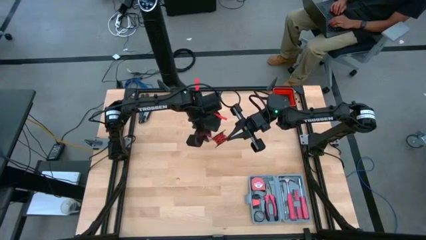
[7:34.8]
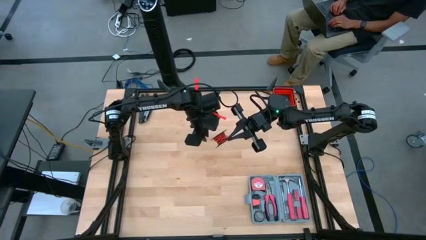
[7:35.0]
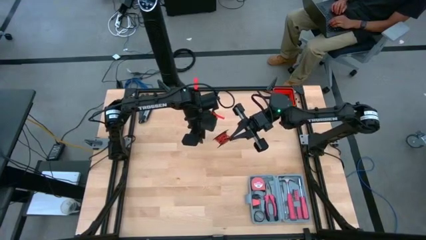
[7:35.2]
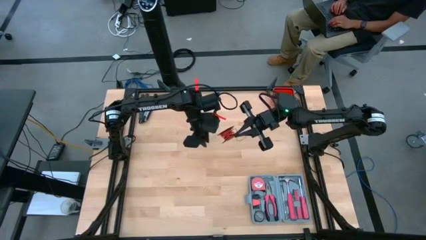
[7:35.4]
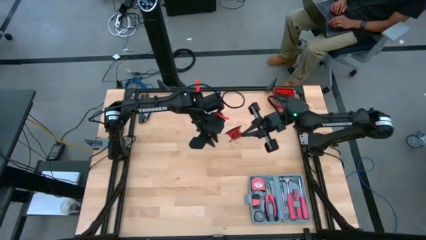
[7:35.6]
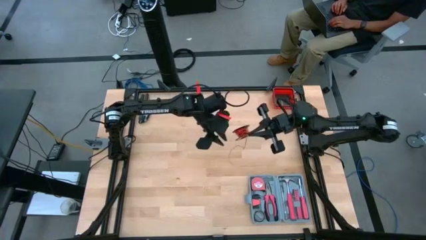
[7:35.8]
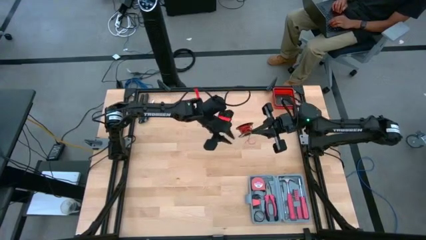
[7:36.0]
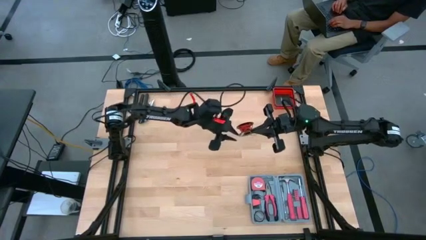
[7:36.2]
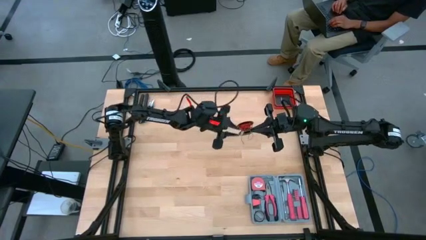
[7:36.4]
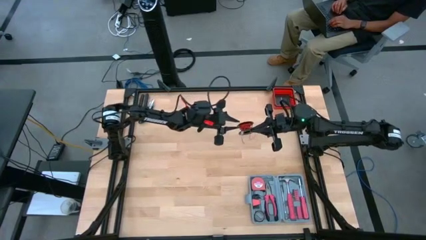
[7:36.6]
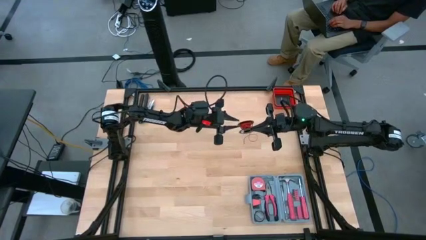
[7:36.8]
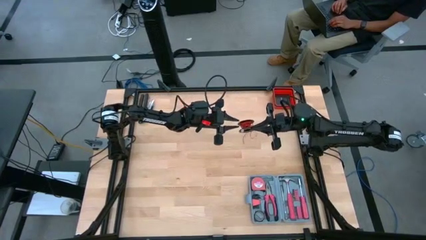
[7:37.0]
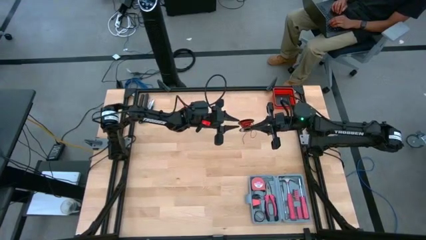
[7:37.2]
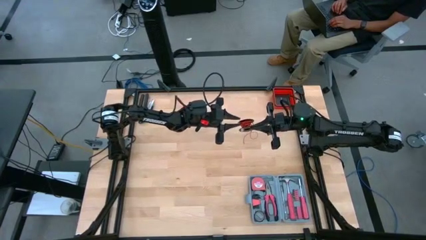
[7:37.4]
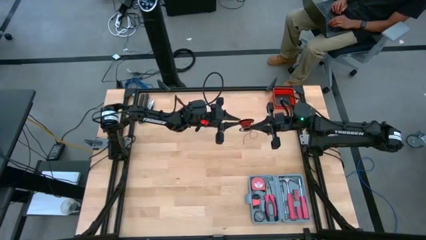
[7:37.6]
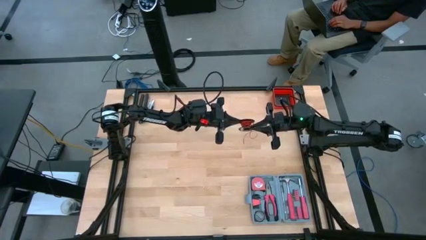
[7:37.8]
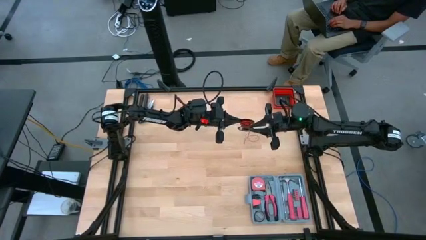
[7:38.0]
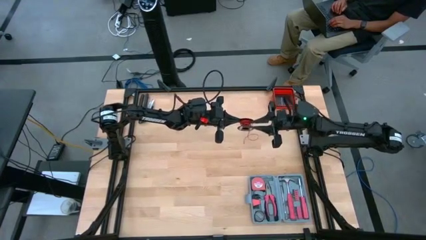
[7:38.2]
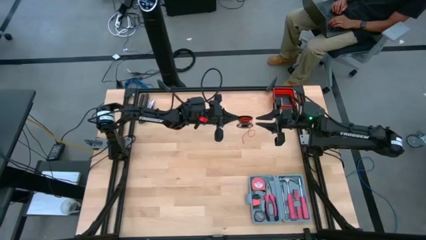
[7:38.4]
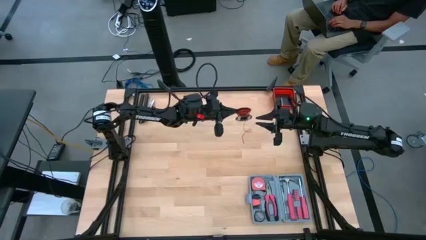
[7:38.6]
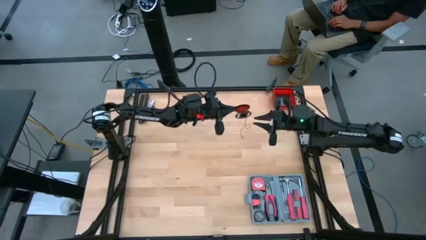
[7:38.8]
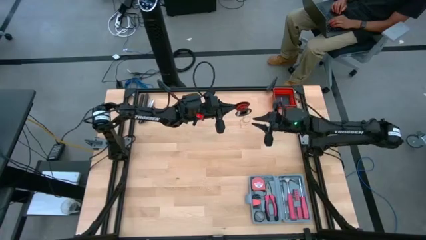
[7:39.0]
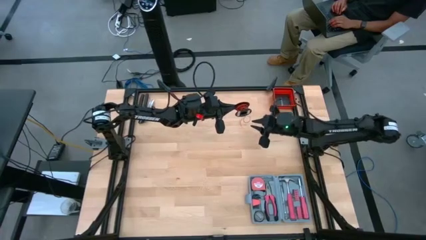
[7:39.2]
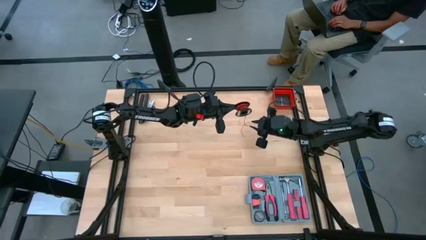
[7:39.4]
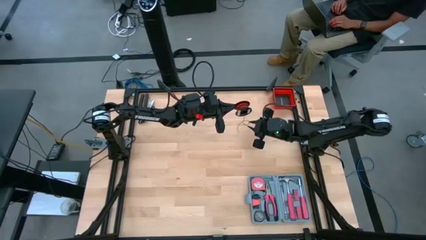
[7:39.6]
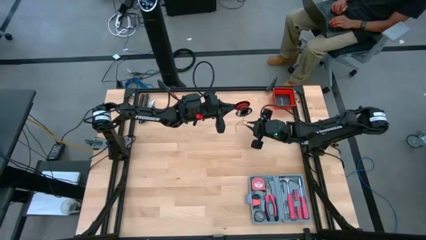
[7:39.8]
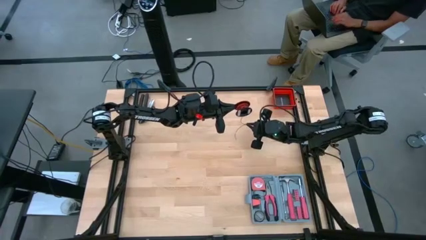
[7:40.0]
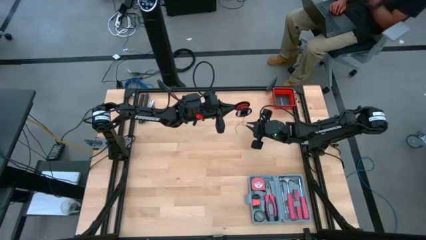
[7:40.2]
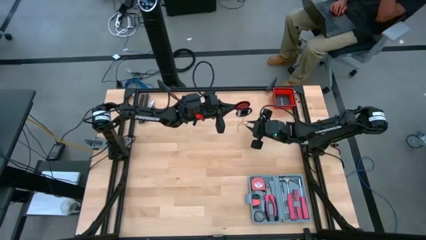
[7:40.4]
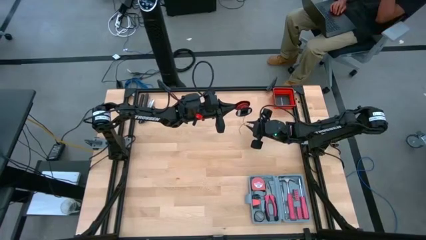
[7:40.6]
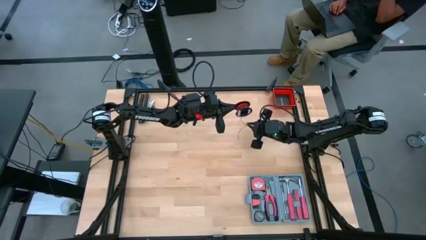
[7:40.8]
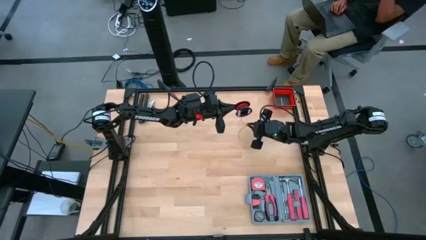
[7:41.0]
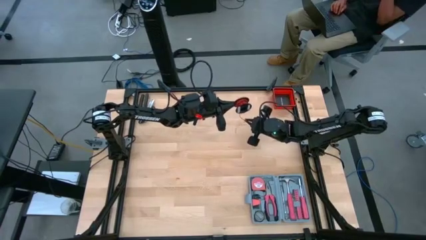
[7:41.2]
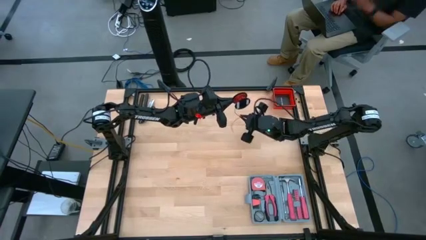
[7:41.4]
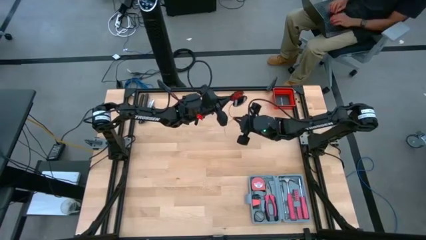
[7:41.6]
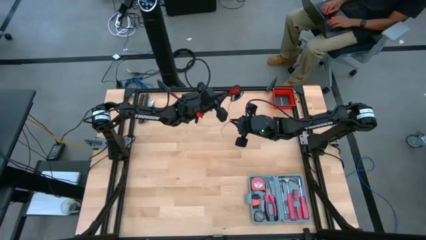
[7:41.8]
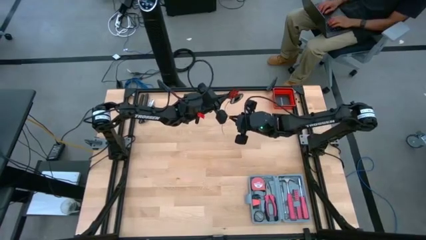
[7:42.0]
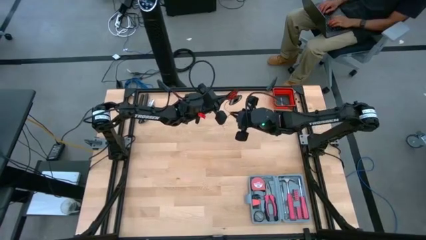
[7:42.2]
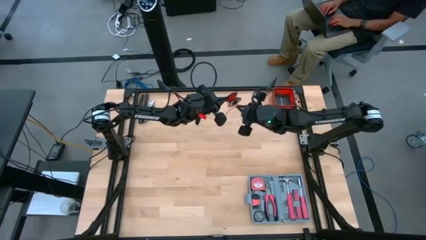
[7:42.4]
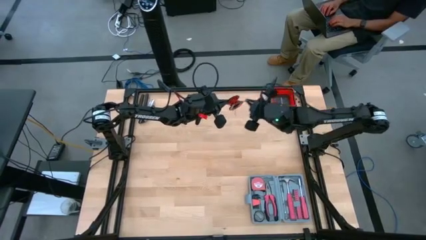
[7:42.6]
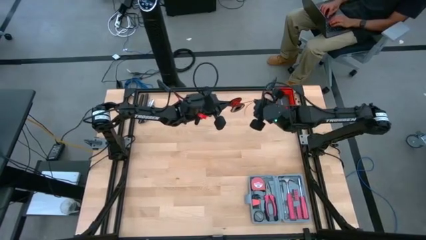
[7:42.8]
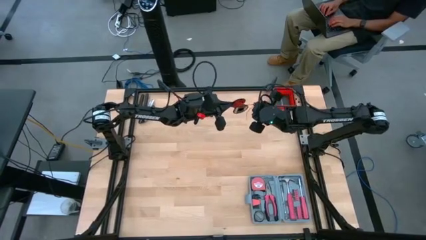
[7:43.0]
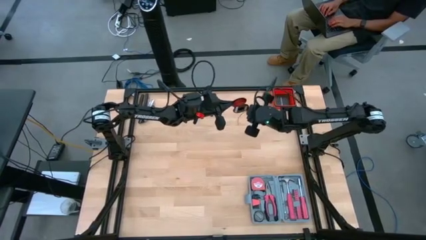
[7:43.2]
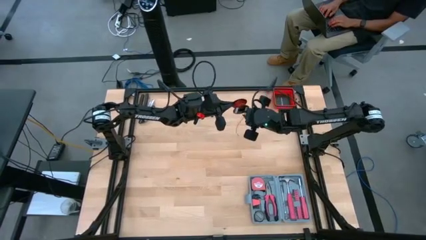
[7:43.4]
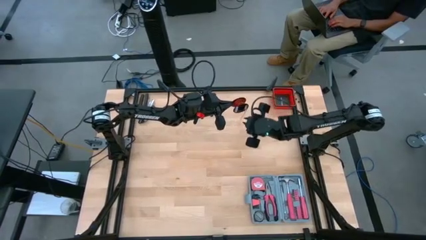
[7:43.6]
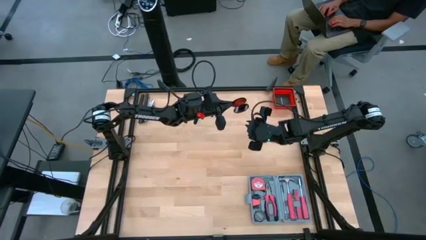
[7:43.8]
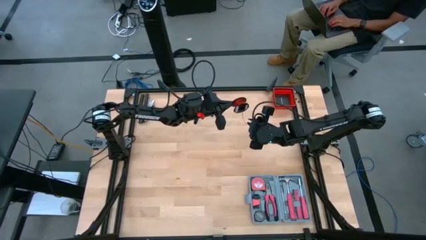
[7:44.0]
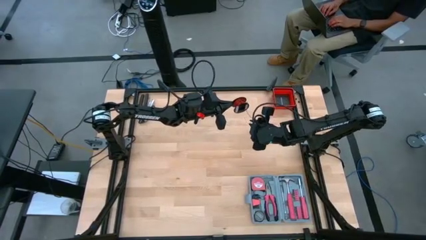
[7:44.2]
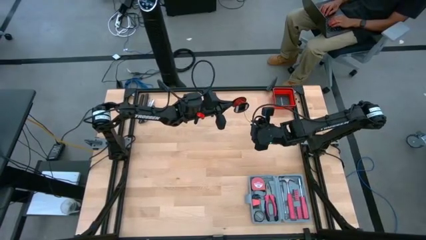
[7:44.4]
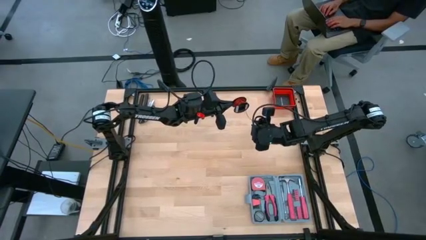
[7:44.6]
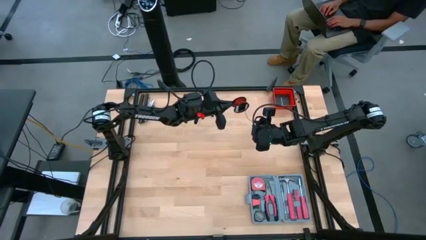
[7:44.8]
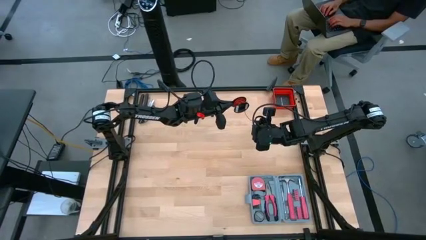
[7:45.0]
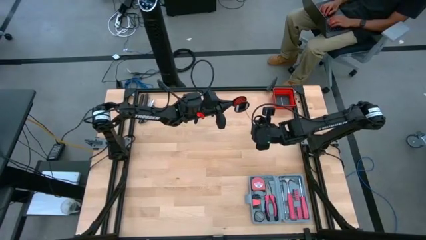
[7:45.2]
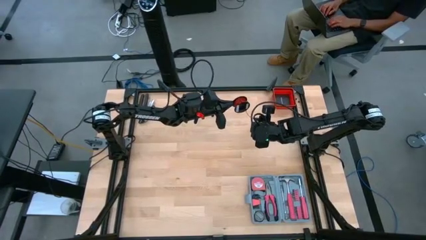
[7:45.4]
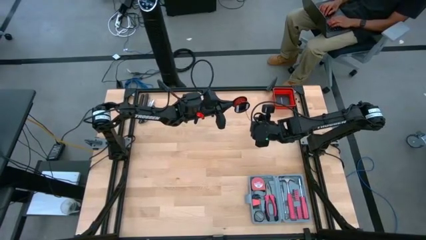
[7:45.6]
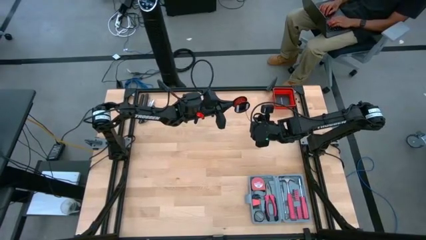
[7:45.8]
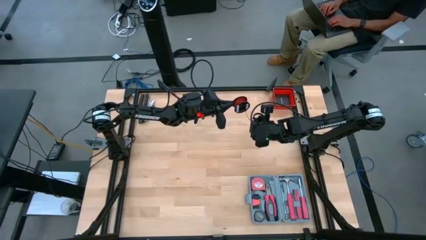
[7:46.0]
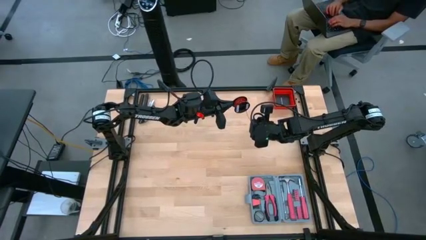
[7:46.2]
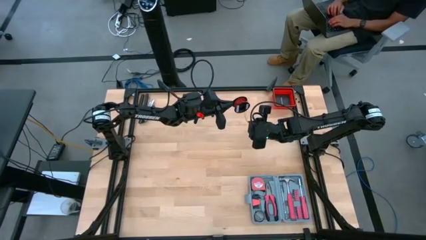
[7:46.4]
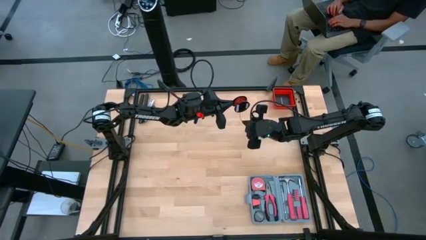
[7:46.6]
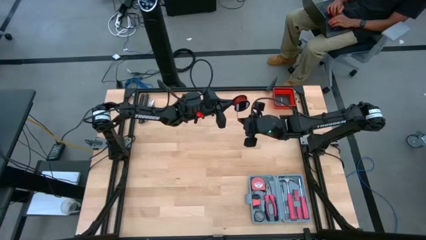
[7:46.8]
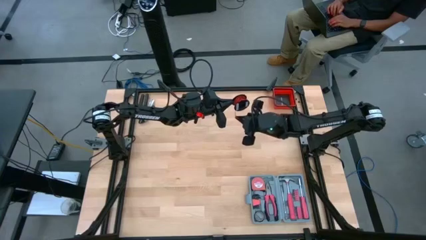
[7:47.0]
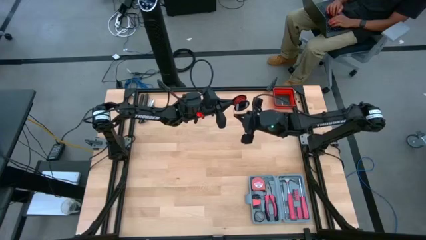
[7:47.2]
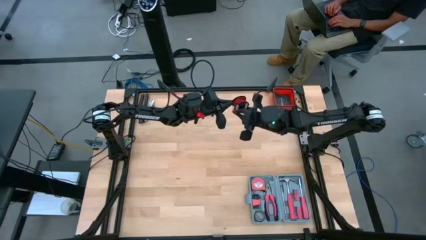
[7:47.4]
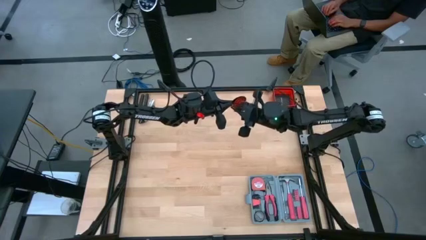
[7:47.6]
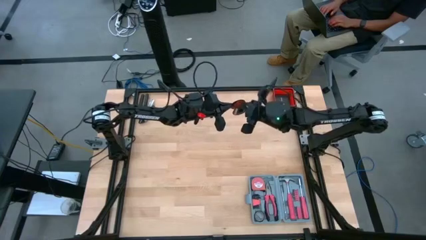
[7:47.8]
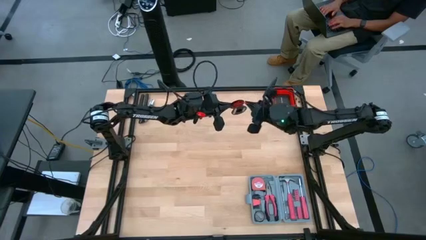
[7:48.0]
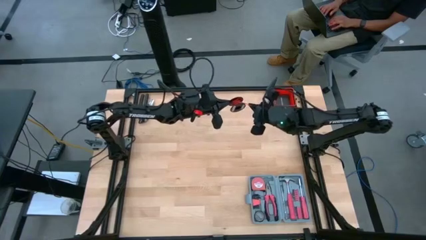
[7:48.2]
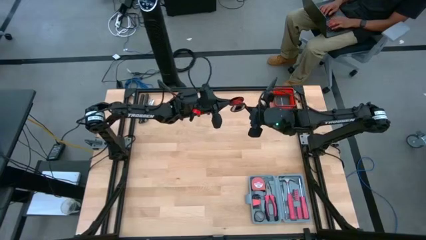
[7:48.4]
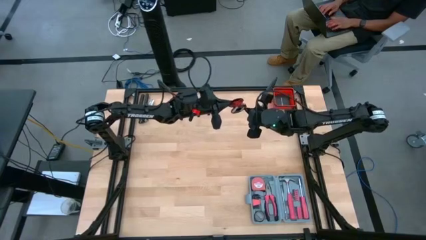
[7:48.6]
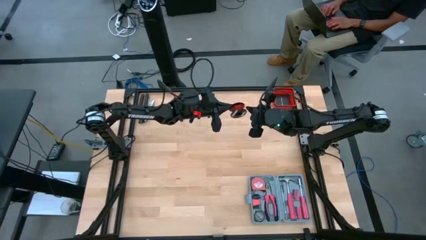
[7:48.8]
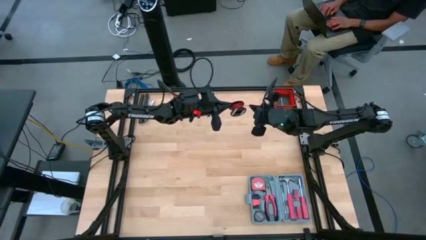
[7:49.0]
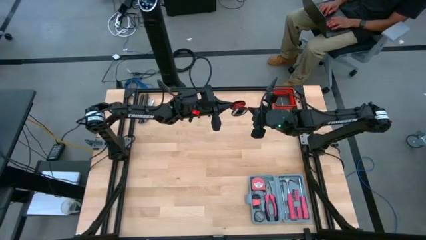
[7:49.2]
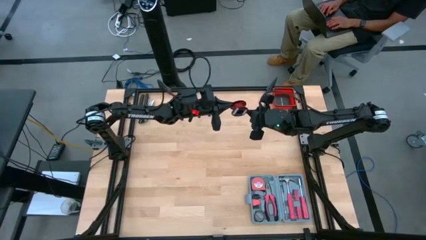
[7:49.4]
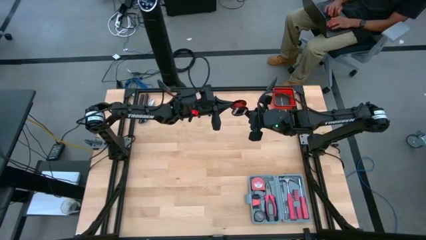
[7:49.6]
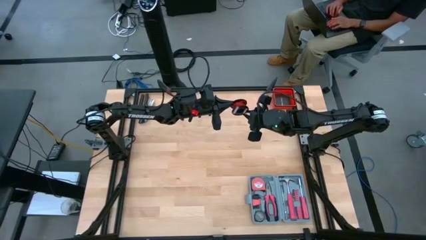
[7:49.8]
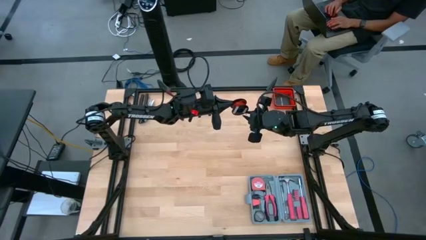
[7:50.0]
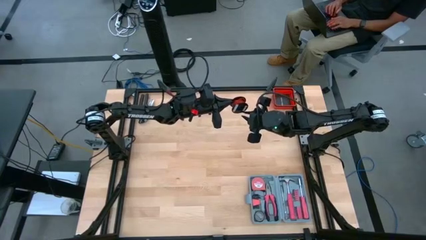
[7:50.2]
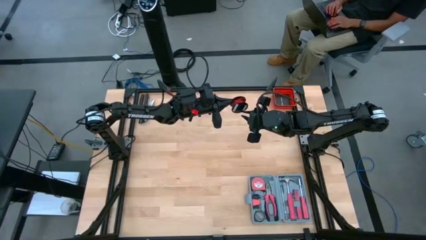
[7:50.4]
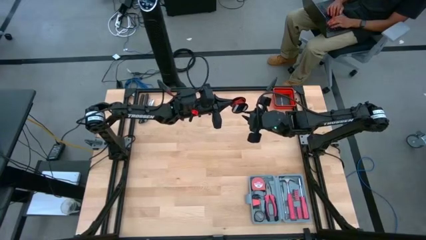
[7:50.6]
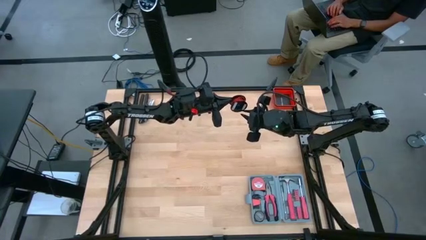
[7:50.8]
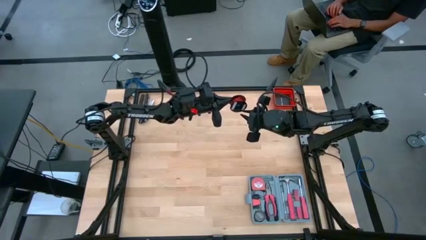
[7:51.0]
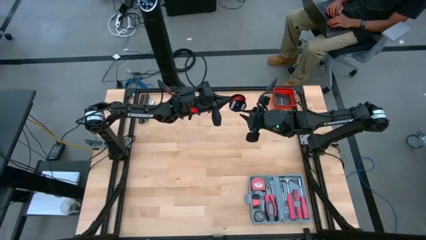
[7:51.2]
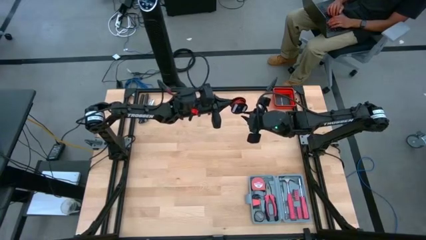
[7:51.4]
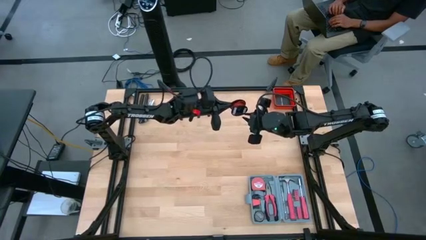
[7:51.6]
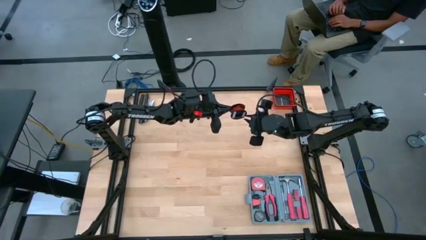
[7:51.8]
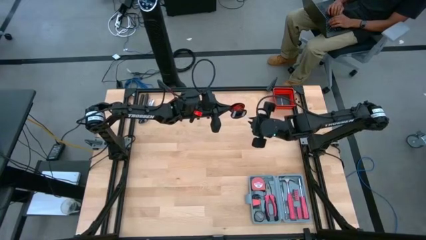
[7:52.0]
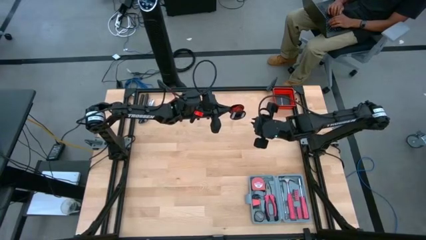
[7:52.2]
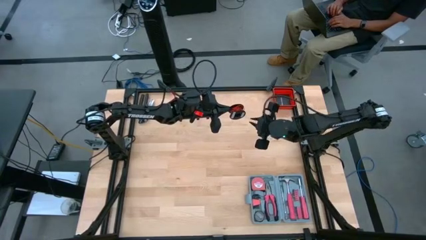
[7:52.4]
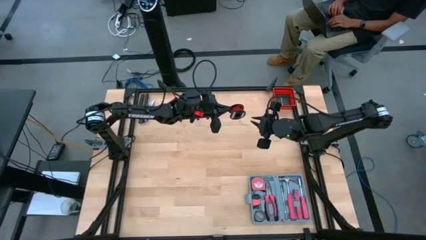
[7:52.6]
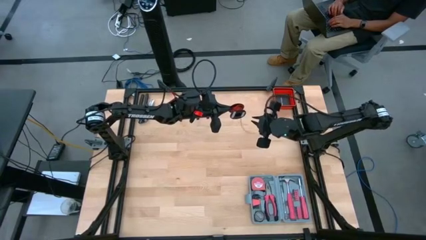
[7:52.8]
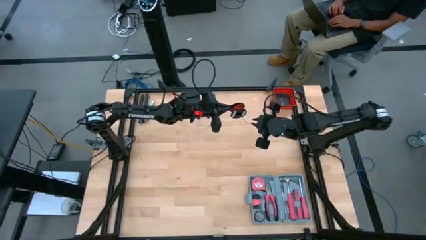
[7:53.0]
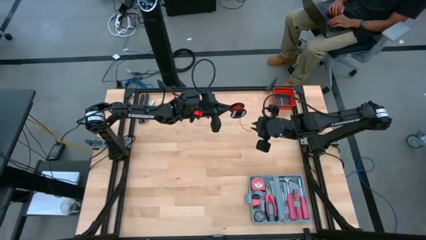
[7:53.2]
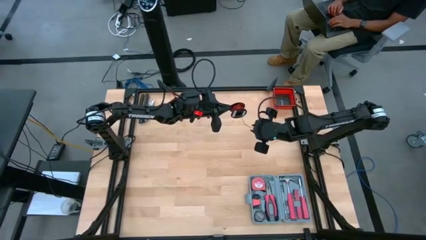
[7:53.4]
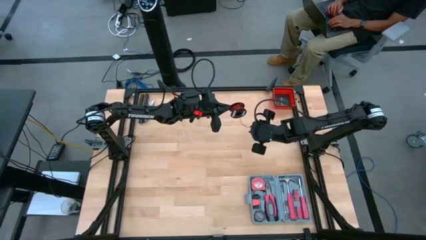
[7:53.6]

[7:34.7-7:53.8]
Task: Coil cords
Coil the wire
